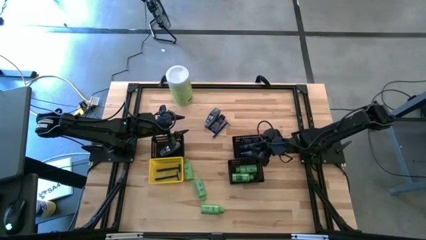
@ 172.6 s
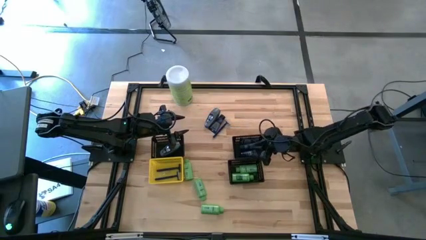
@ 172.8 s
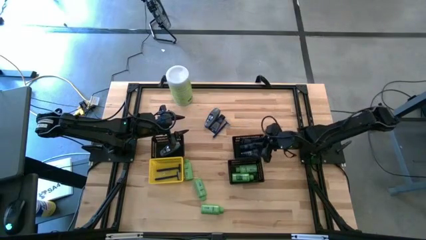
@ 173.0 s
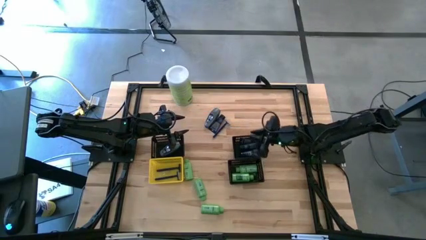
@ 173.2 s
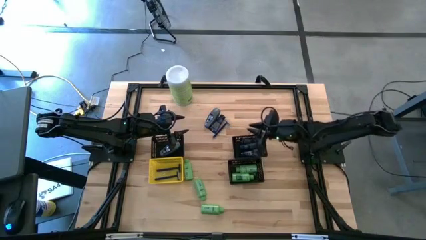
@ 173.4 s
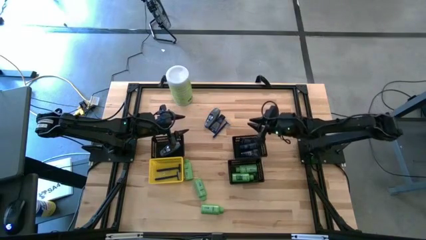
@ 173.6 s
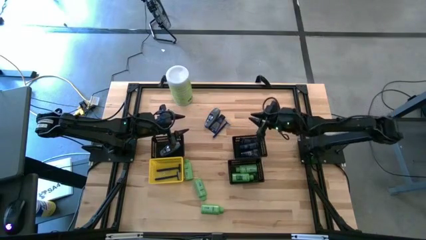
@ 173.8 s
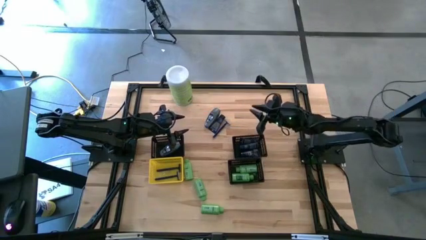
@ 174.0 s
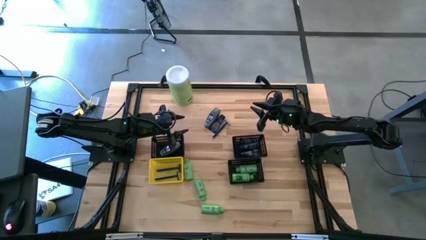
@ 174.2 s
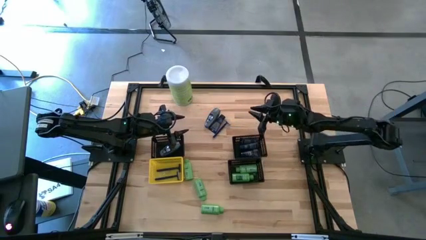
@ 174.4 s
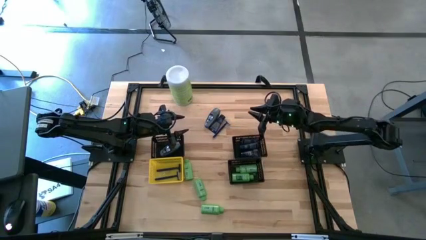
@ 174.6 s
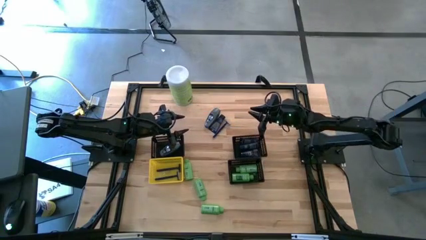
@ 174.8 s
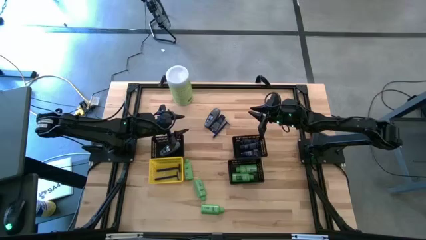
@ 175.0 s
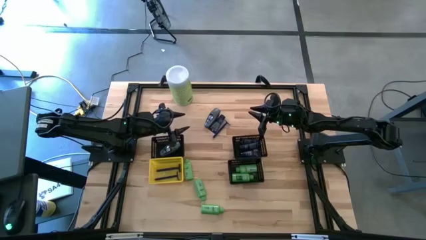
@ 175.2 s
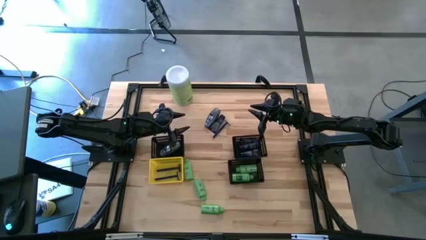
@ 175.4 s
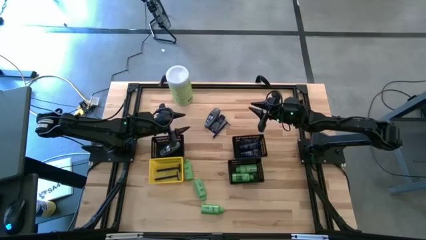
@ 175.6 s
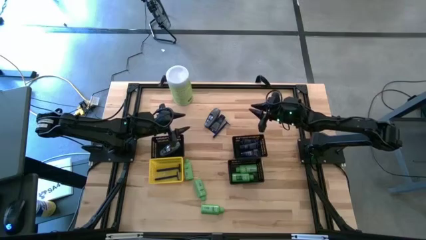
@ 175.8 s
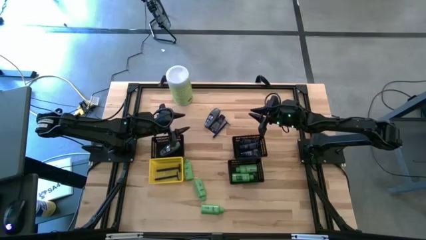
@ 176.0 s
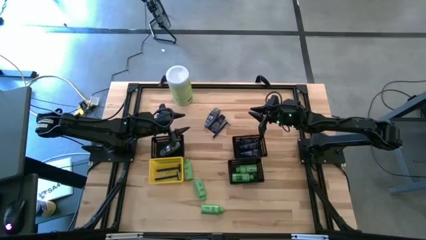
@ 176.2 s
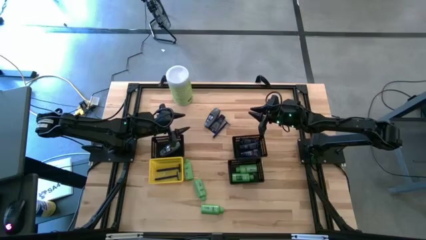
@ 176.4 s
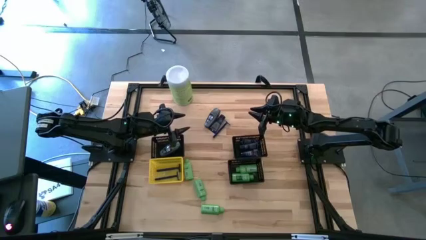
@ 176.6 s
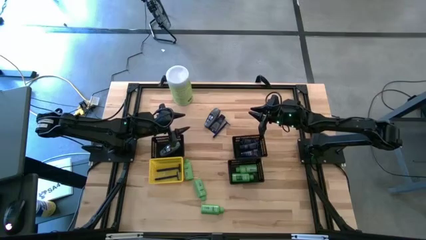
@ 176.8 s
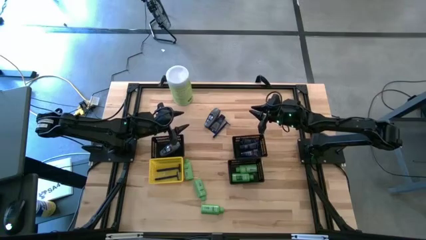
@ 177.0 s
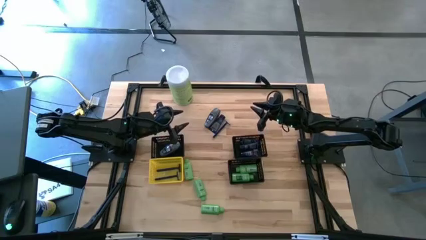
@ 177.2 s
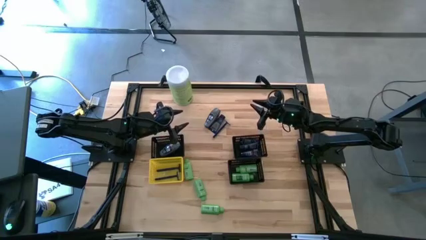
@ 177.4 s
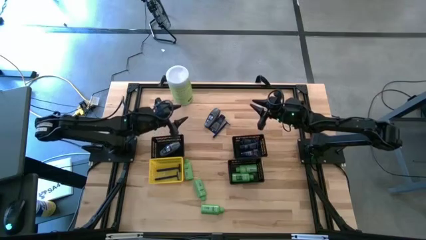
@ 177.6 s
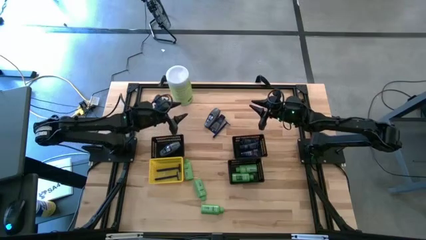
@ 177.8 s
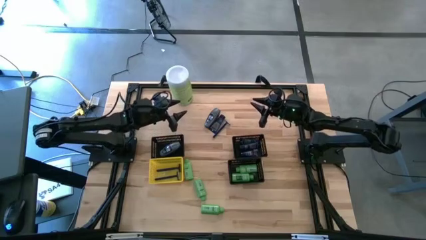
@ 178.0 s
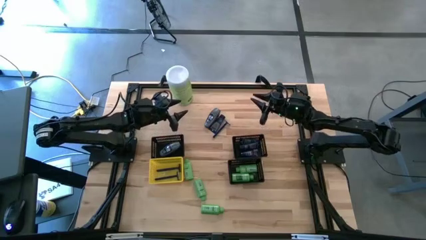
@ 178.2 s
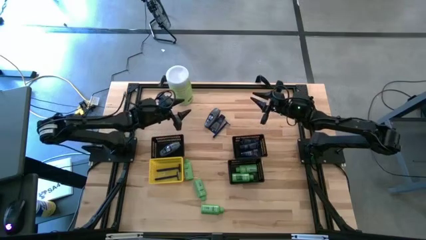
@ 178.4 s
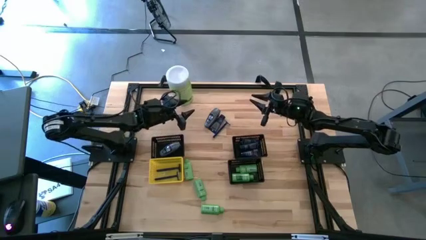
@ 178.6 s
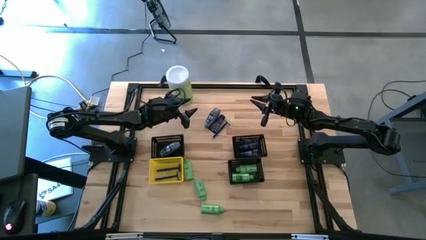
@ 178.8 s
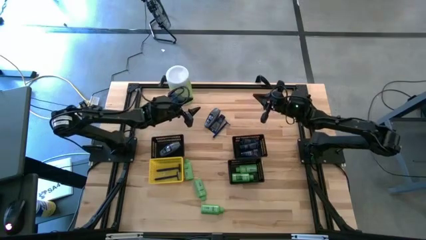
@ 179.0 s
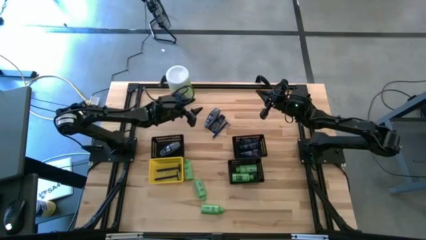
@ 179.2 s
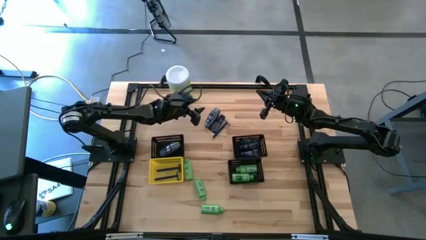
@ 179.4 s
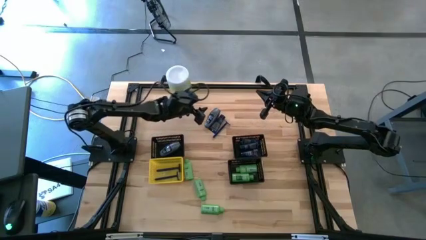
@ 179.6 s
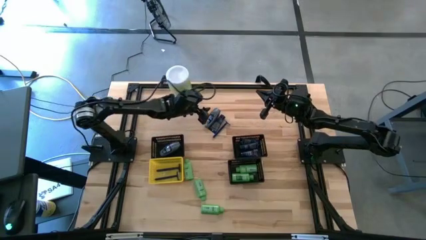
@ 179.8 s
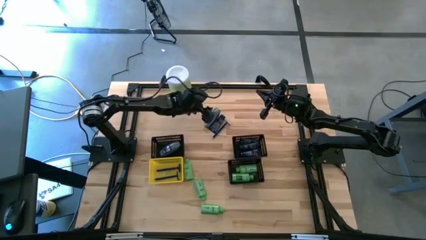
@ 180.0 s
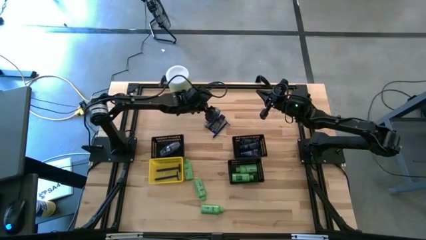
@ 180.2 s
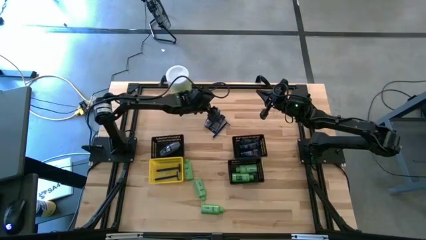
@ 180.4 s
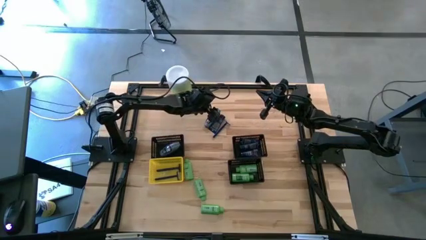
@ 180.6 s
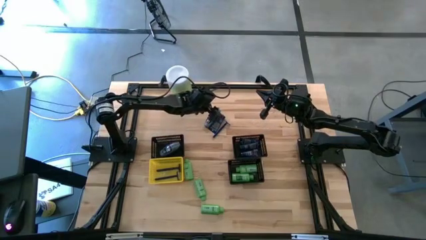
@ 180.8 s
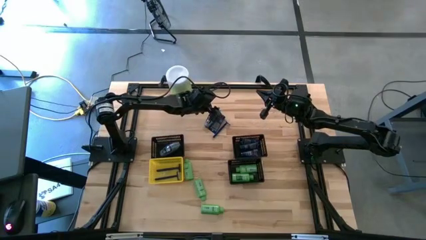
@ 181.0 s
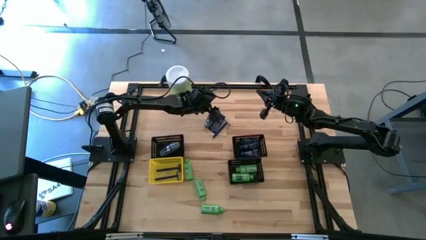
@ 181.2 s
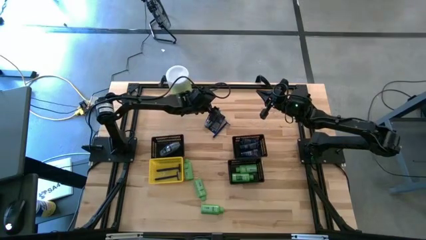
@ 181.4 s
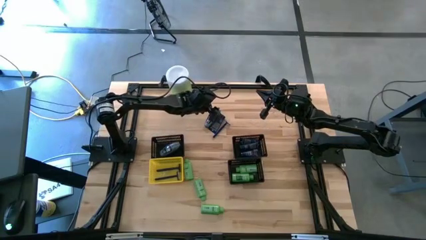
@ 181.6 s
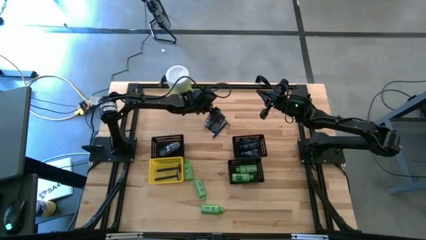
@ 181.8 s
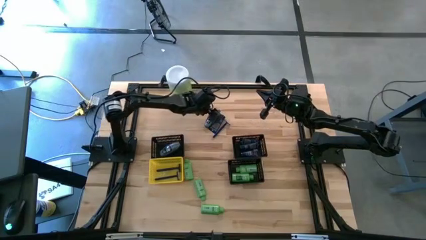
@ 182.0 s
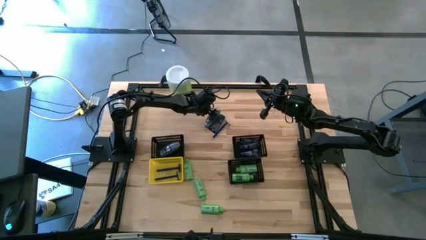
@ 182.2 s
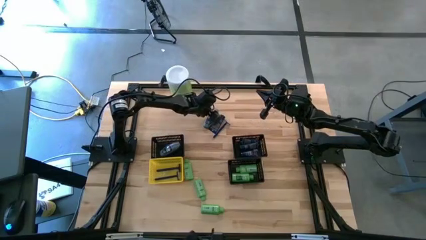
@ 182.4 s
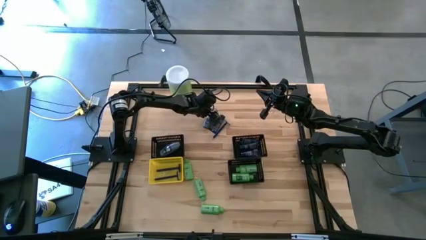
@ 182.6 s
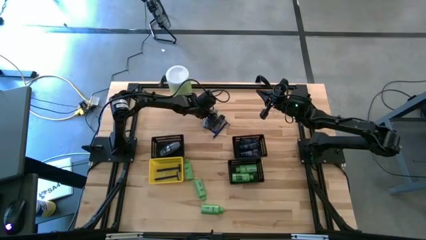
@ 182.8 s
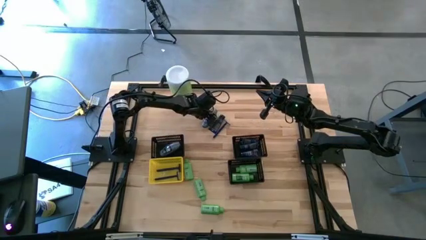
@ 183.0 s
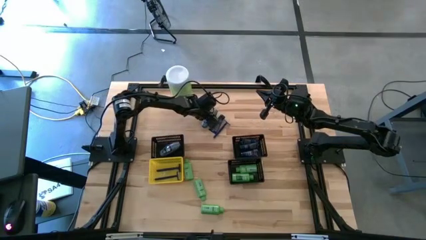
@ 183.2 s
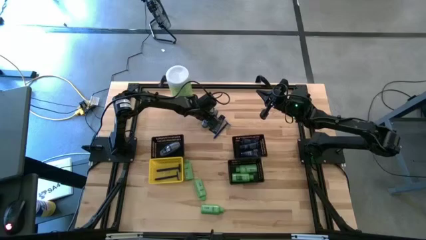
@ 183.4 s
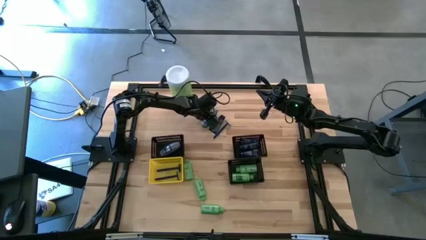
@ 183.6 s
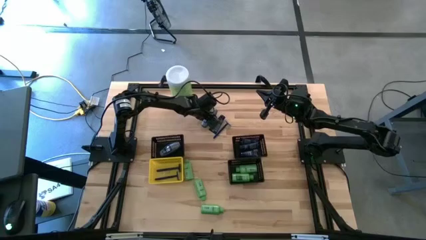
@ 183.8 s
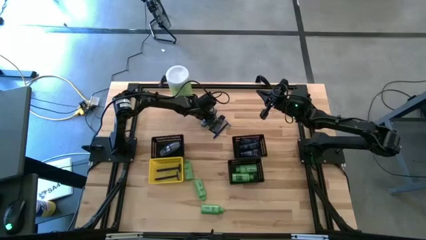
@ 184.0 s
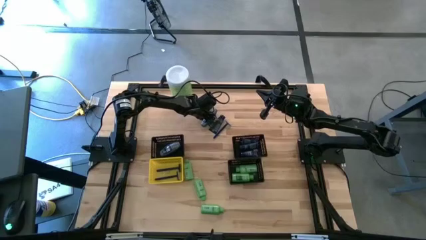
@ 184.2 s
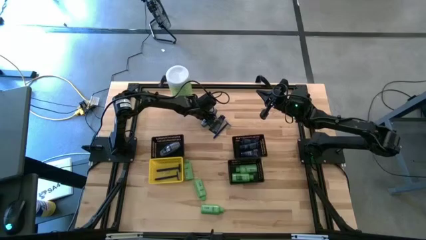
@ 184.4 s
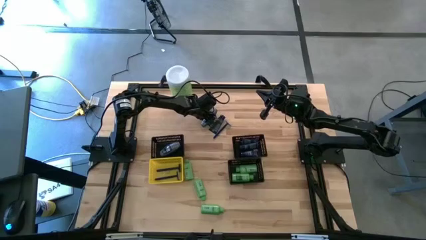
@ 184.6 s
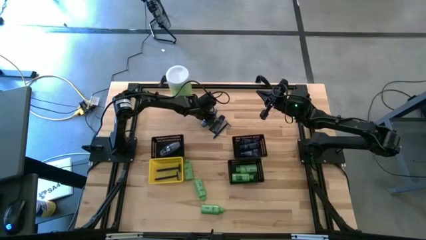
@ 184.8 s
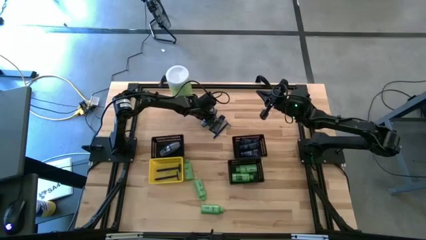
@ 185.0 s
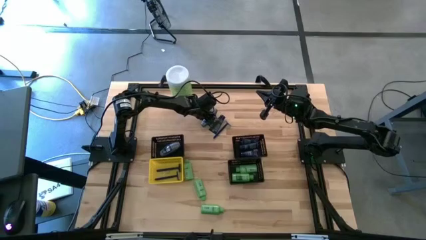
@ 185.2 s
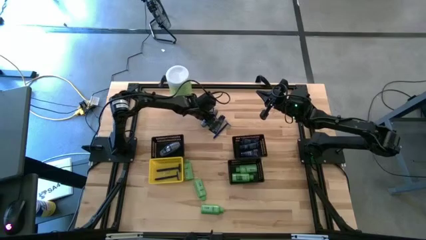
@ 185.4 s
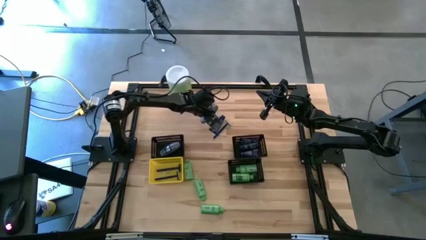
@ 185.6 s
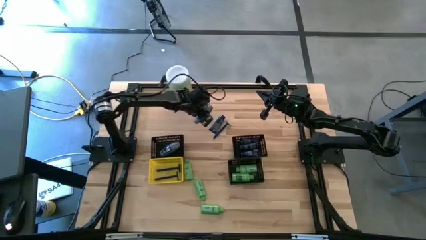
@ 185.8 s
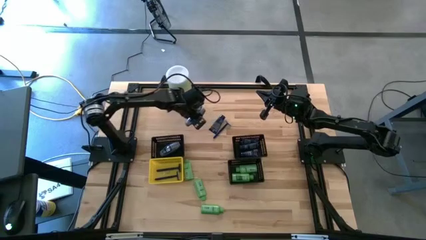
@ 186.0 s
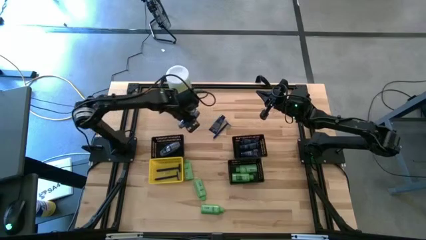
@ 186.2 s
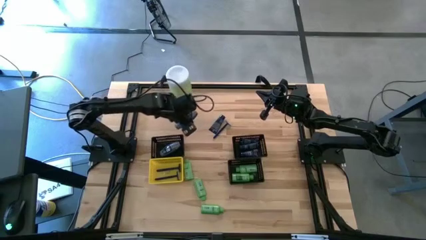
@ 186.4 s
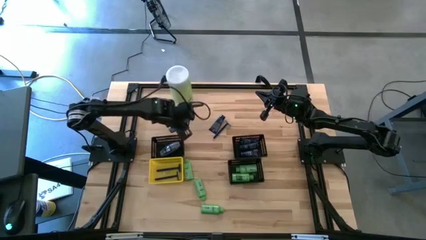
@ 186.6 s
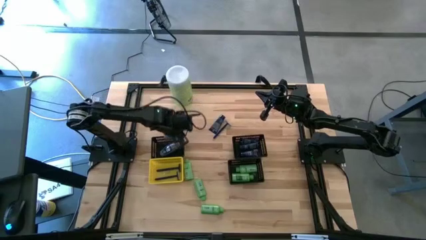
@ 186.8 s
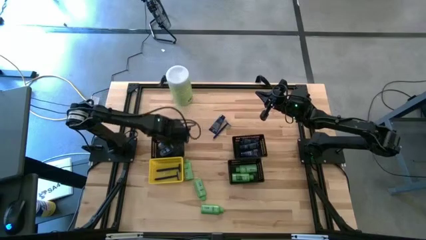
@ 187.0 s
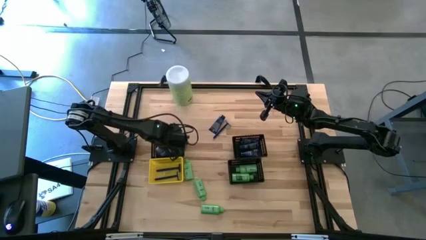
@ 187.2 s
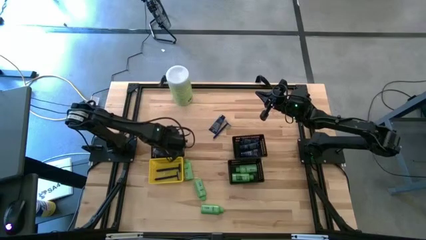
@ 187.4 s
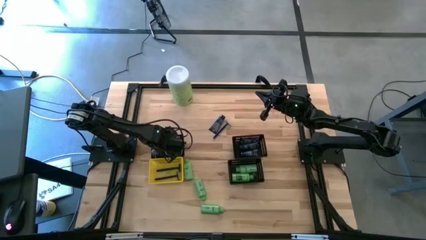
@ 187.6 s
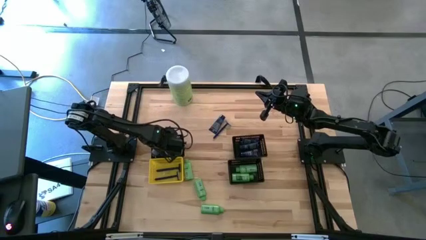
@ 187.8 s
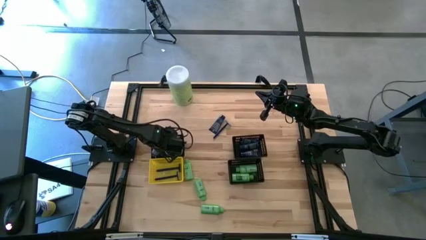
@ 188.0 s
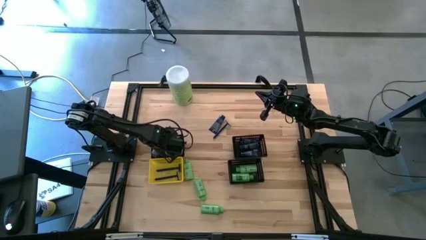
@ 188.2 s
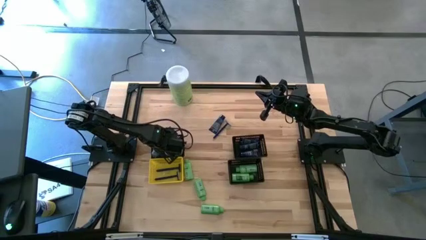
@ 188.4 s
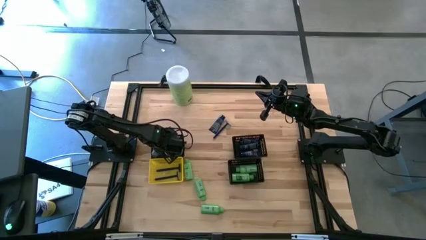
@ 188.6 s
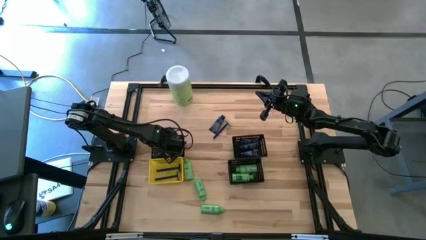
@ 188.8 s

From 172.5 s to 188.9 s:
Task: Pick & Place Travel size toiletries
Put the gray deodorant bottle into the top left black bin
